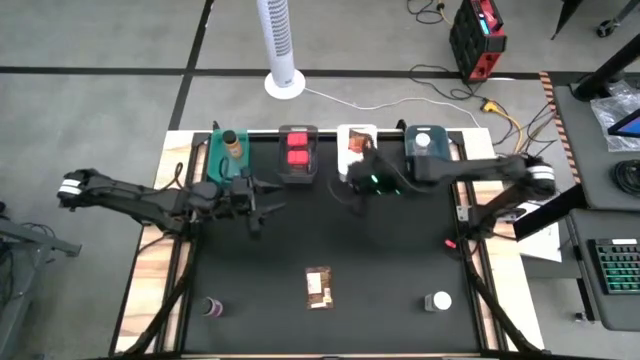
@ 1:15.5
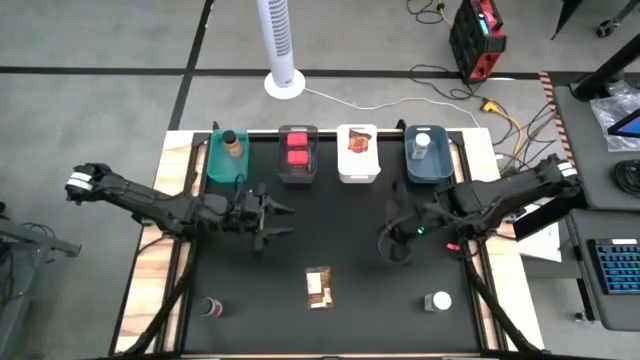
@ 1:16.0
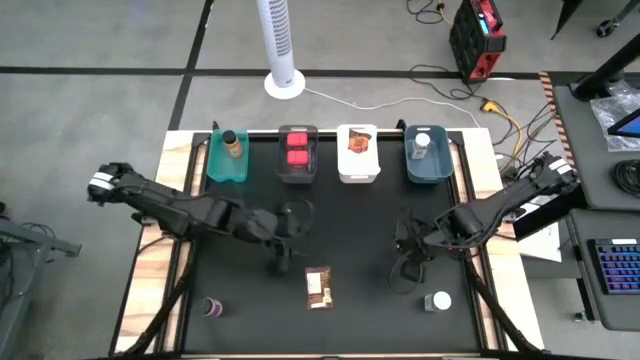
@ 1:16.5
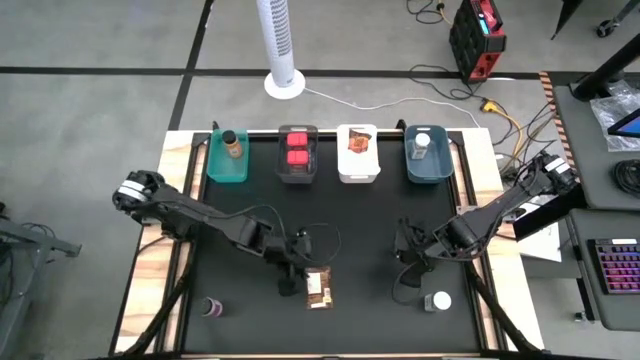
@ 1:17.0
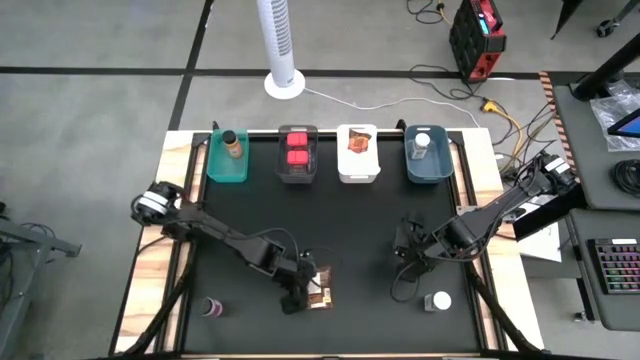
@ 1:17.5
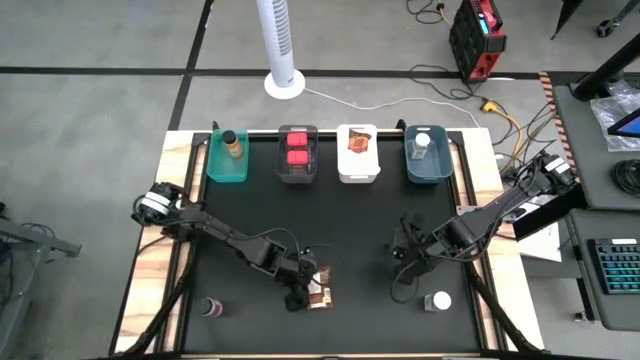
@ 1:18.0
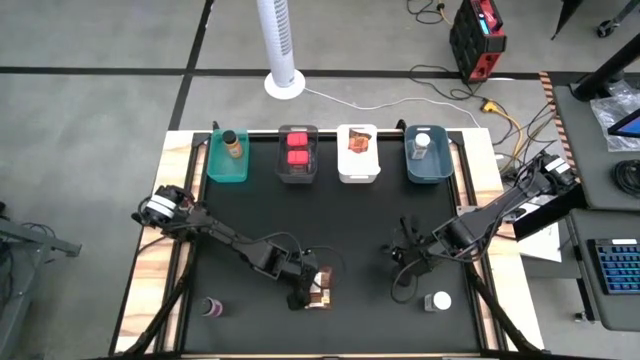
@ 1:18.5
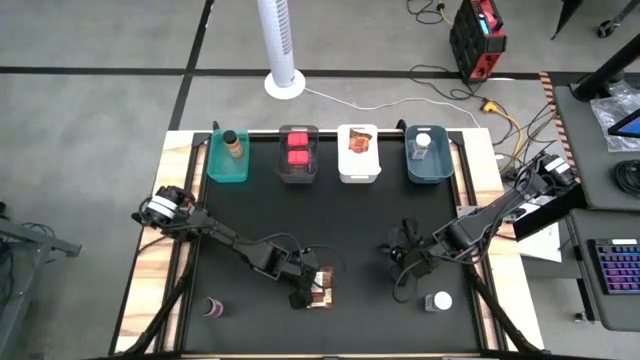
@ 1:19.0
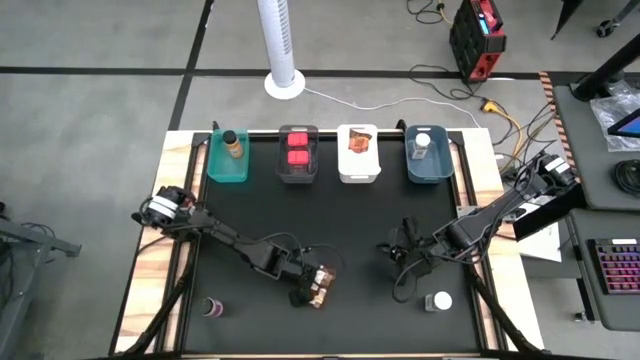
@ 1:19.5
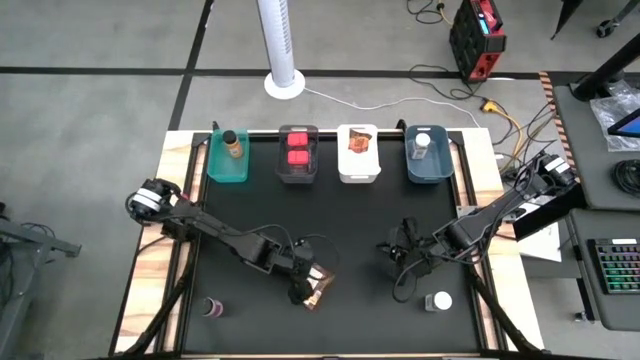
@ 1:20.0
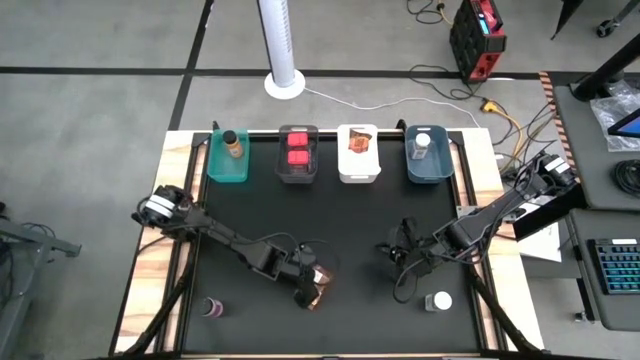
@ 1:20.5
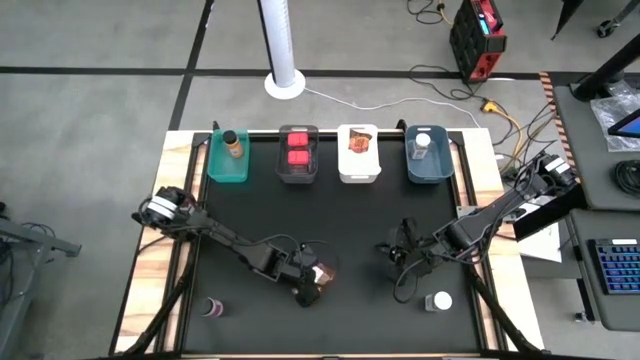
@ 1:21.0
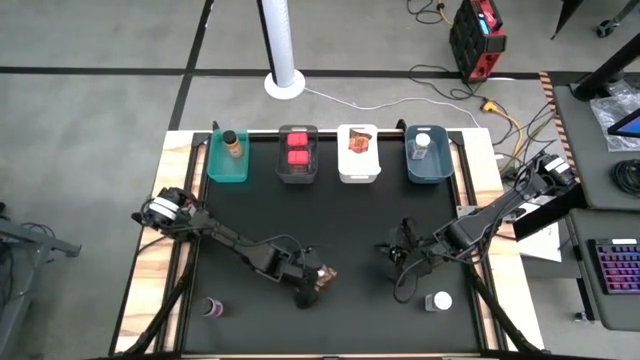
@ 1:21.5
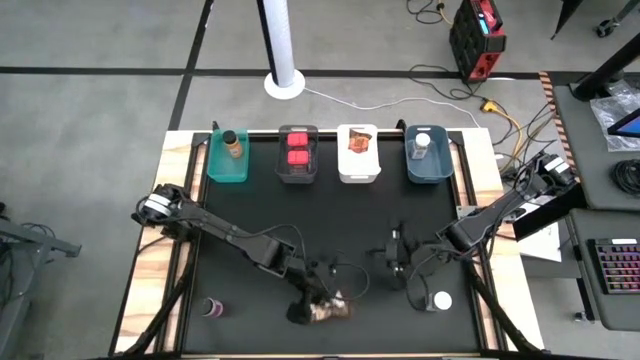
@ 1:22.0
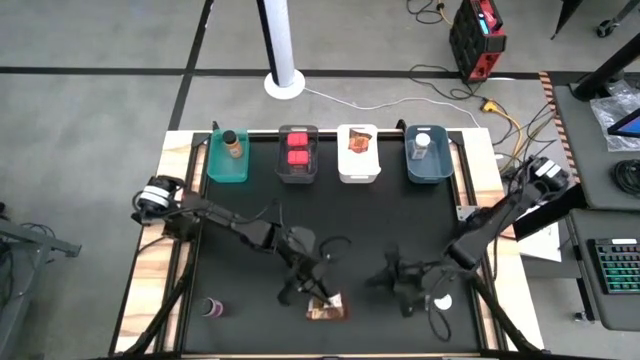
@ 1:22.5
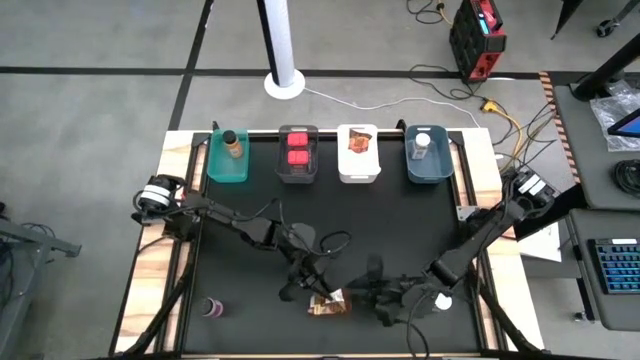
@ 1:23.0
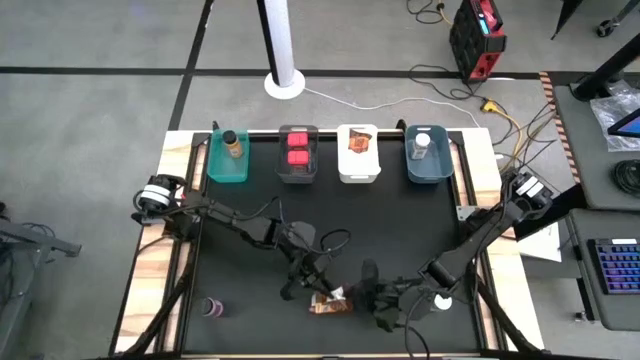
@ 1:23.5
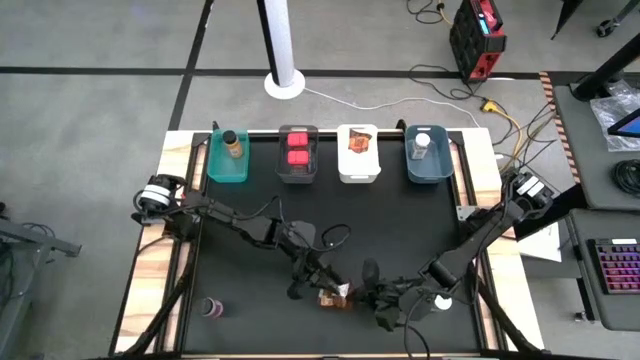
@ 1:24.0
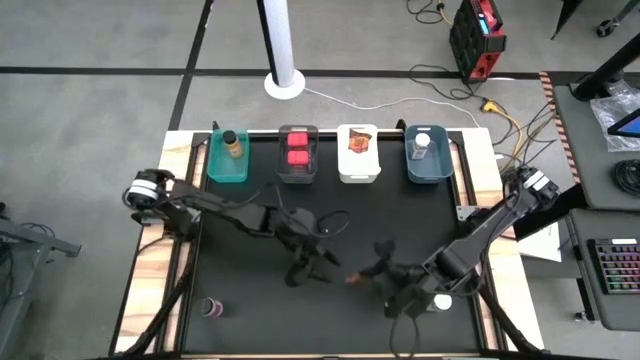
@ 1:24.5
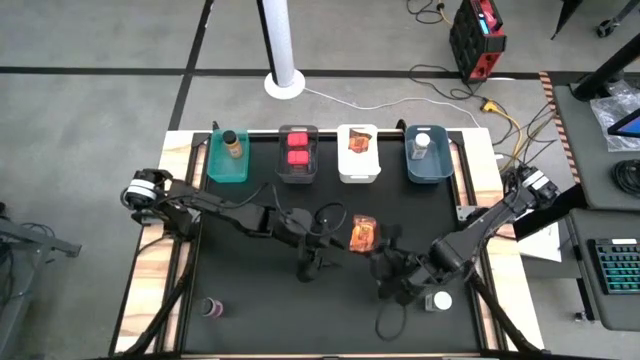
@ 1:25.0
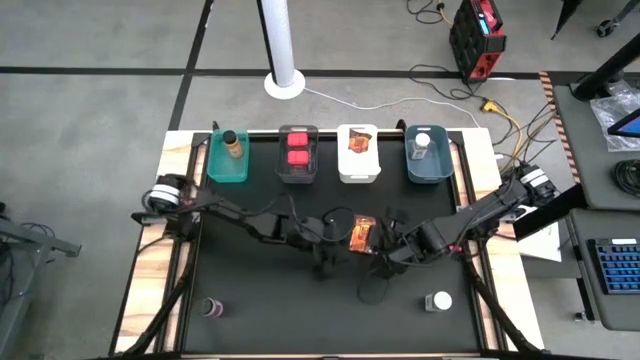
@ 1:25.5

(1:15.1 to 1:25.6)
Task: Sort spices by type
Put the orange seasoning pack into the white bin

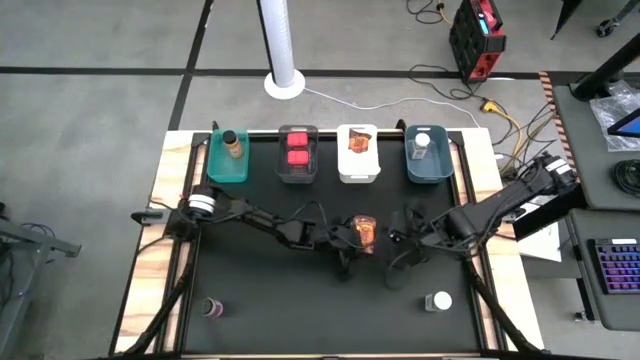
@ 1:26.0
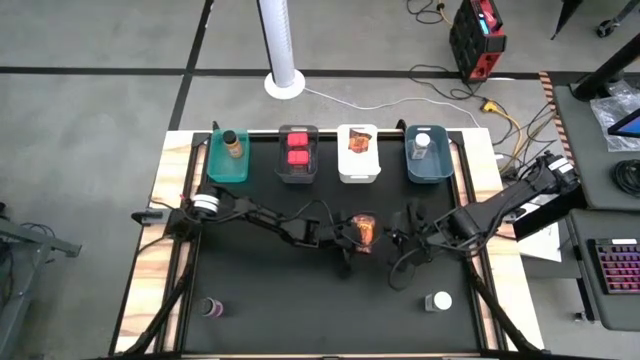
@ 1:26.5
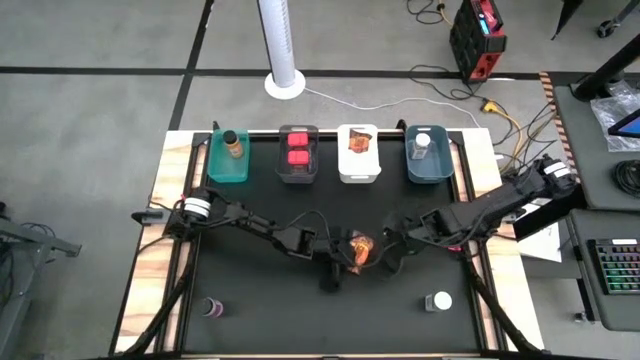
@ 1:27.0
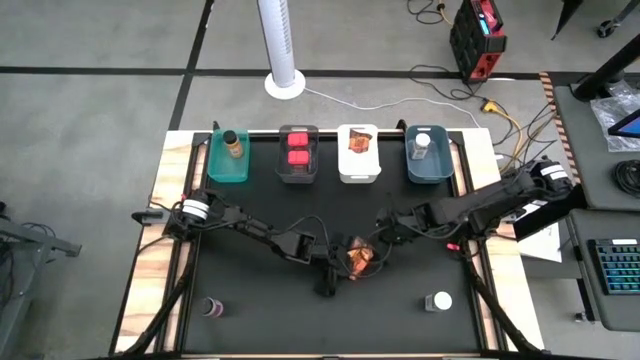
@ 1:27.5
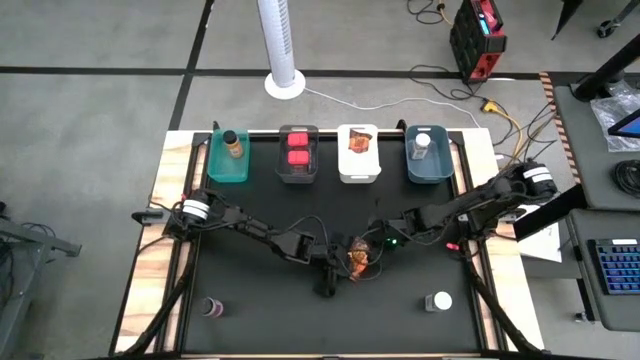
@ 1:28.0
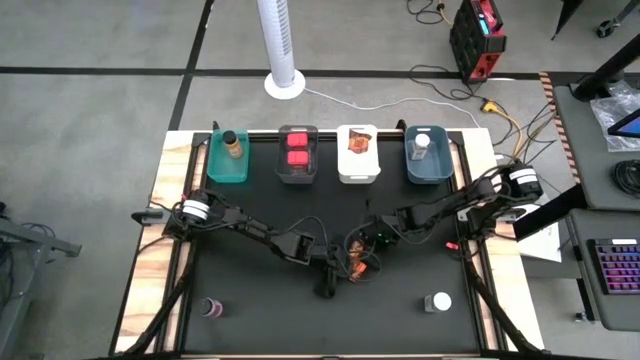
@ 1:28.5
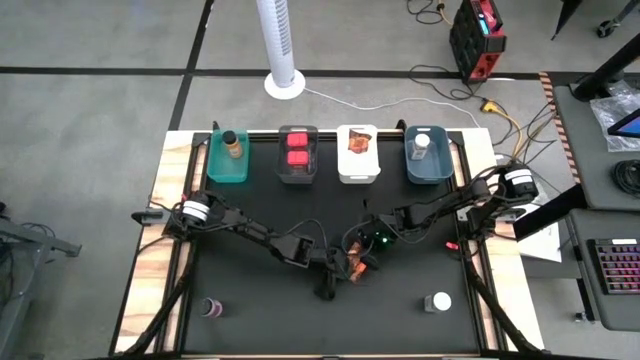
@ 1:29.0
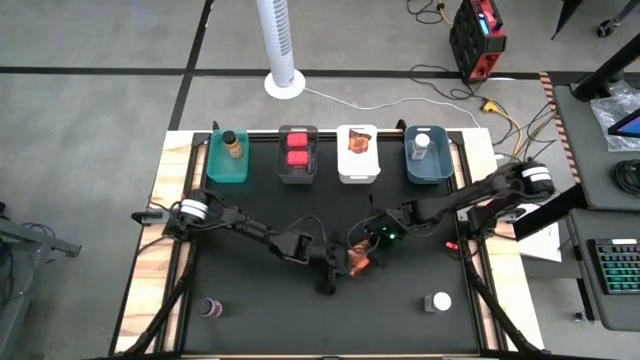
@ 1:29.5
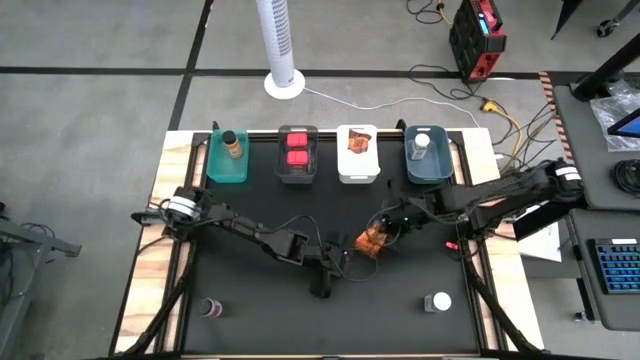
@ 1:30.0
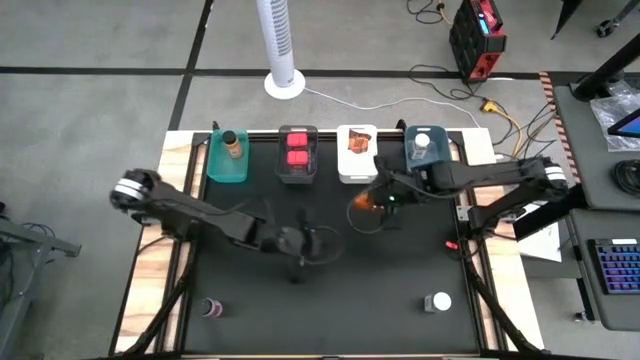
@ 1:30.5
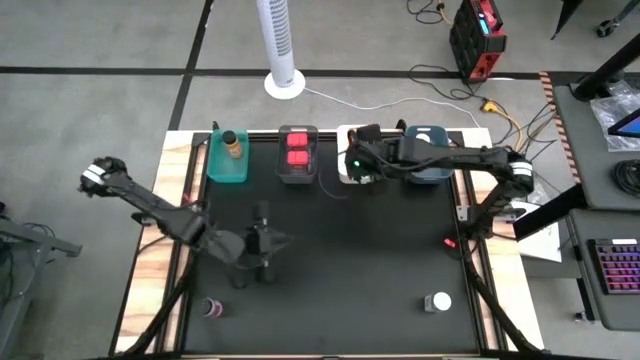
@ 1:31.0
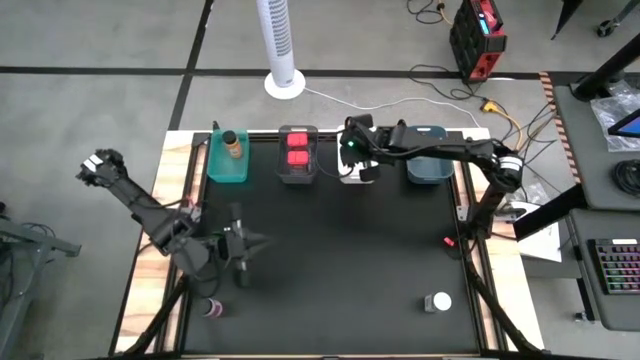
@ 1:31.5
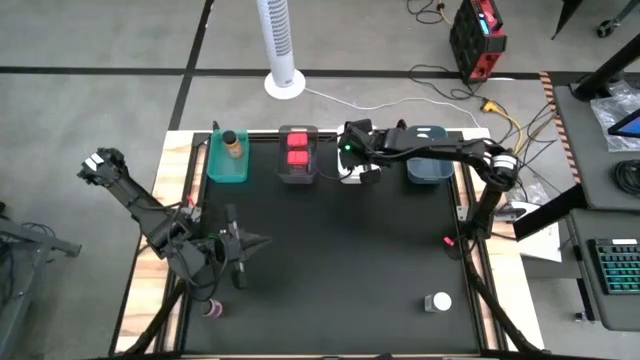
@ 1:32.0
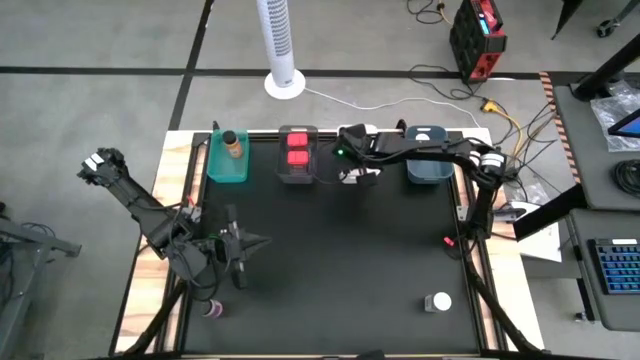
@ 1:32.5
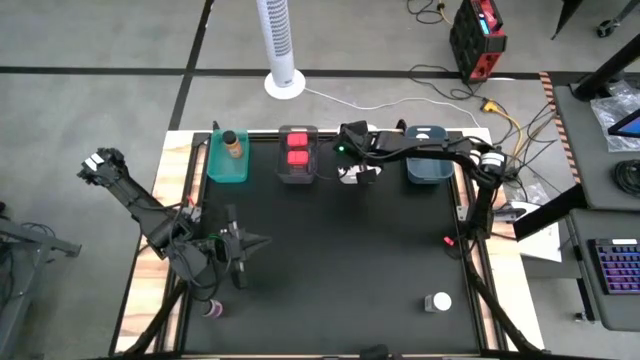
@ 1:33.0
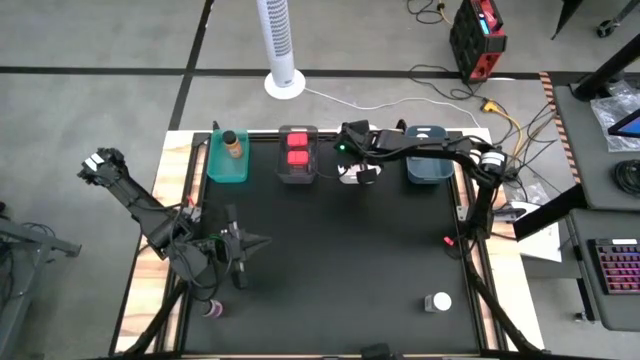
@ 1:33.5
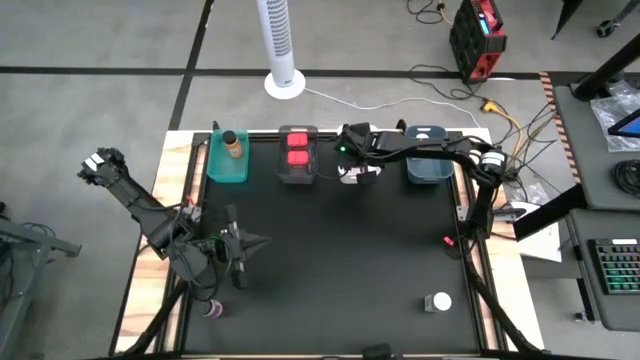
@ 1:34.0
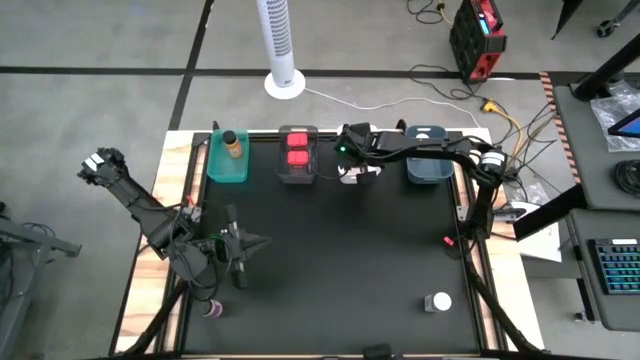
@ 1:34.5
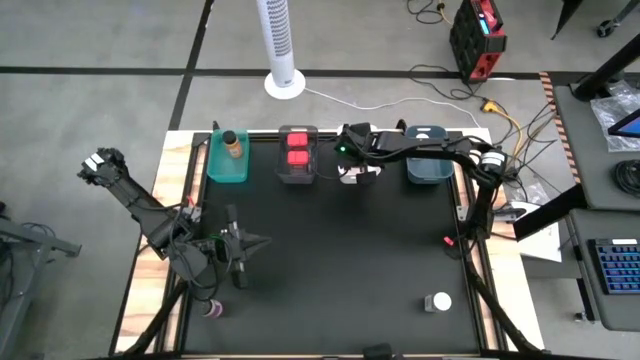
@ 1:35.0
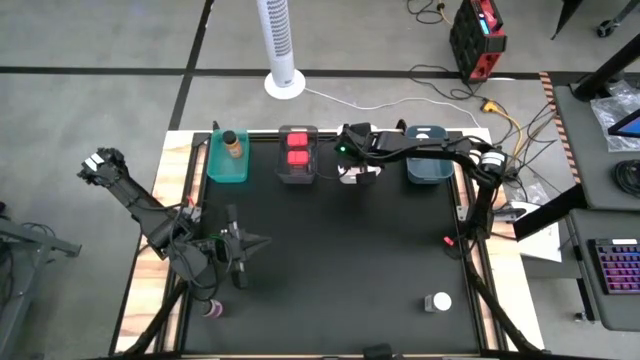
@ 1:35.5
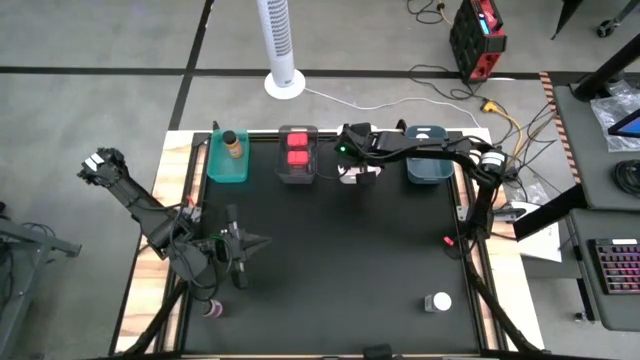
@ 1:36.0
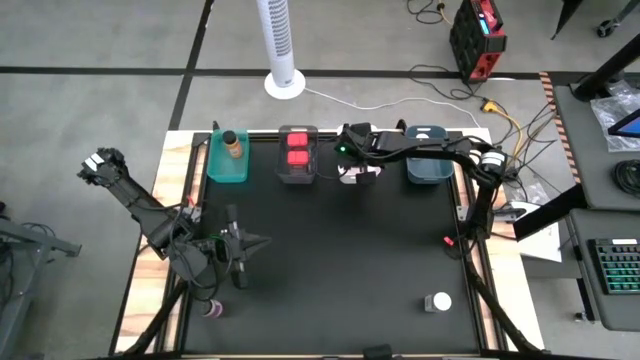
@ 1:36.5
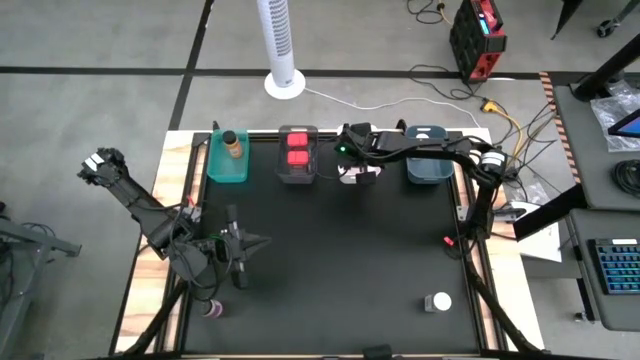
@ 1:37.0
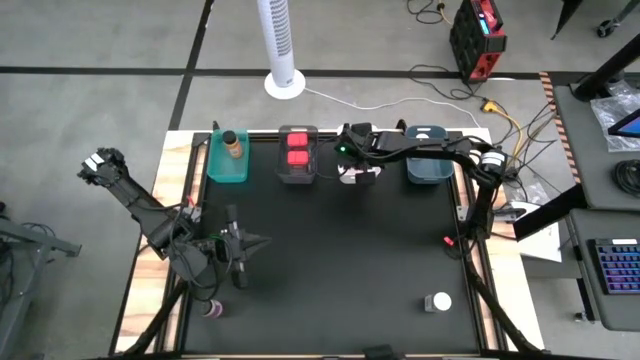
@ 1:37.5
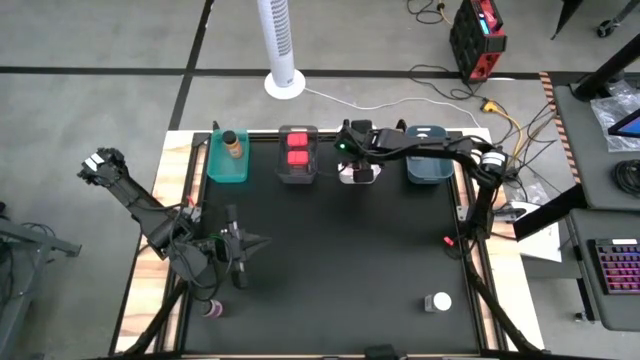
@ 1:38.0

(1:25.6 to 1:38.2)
Put the orange seasoning pack into the white bin
